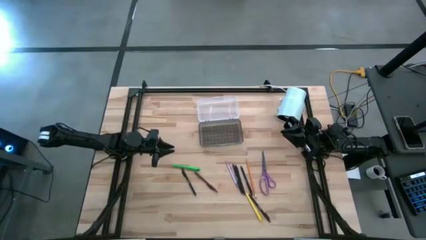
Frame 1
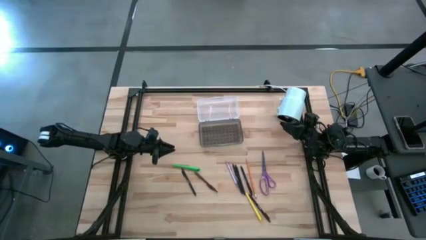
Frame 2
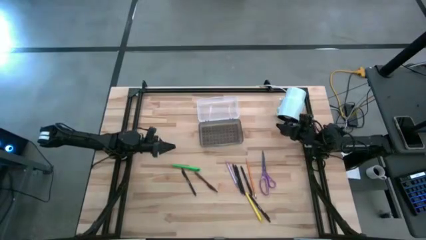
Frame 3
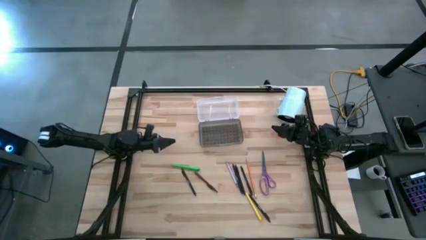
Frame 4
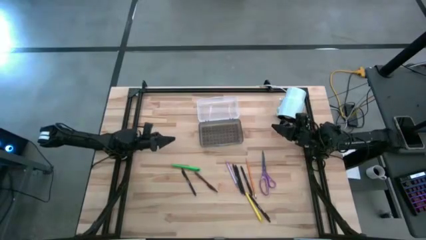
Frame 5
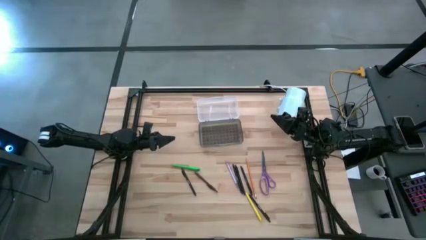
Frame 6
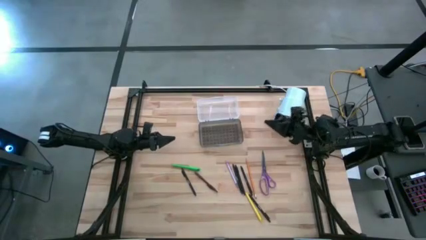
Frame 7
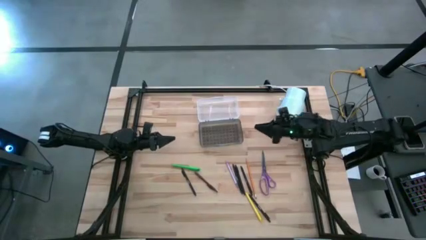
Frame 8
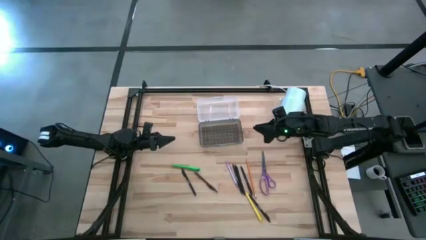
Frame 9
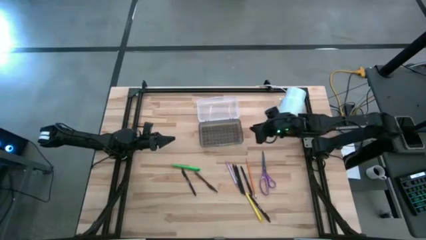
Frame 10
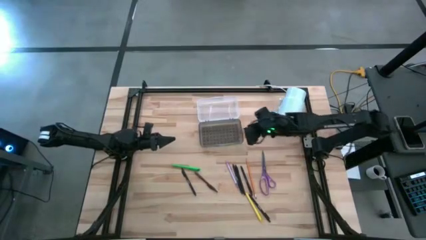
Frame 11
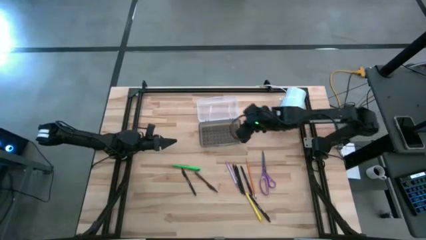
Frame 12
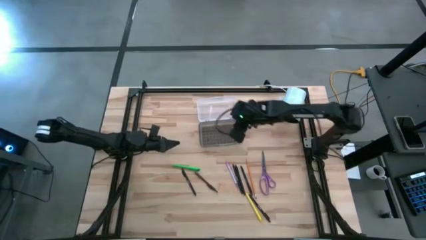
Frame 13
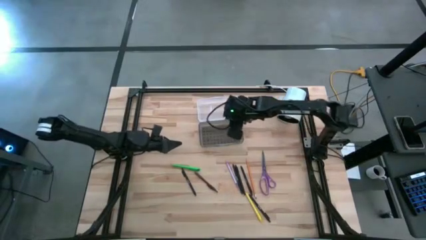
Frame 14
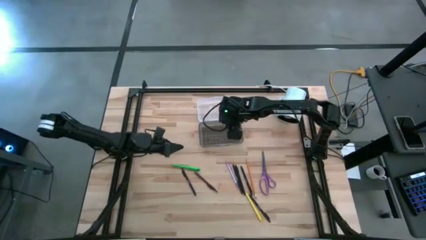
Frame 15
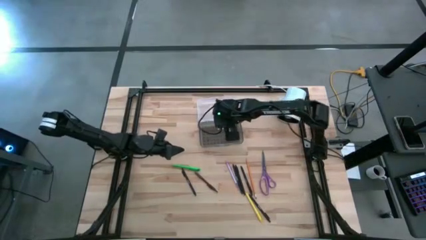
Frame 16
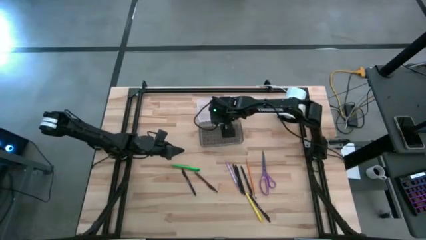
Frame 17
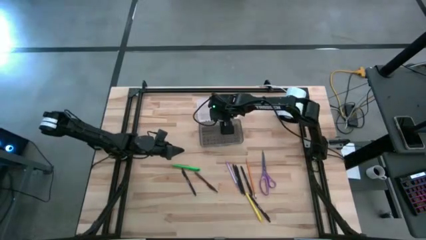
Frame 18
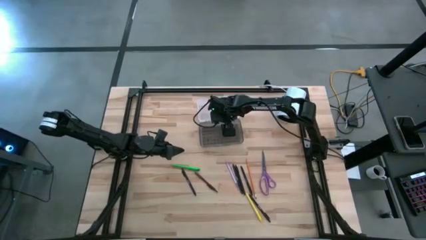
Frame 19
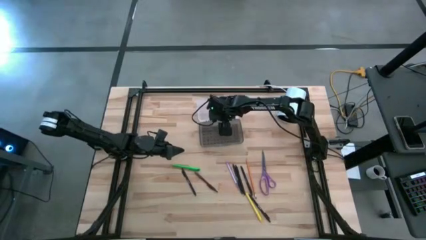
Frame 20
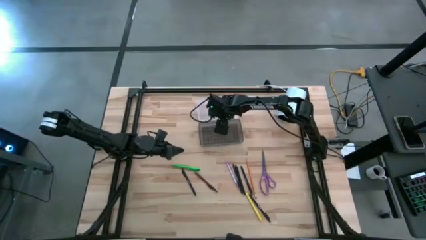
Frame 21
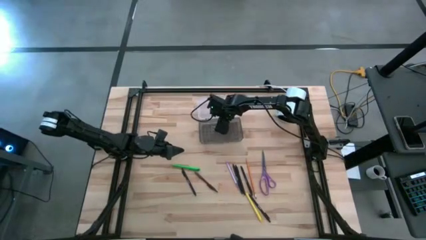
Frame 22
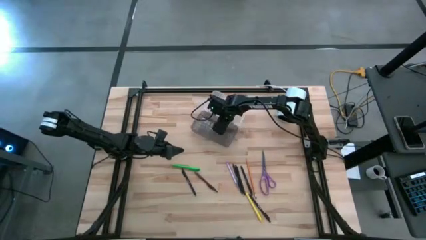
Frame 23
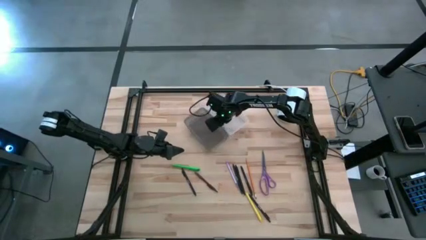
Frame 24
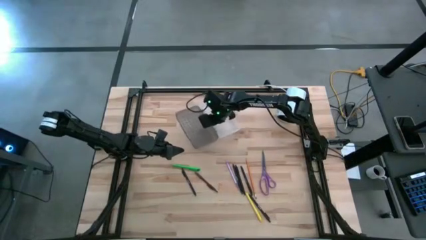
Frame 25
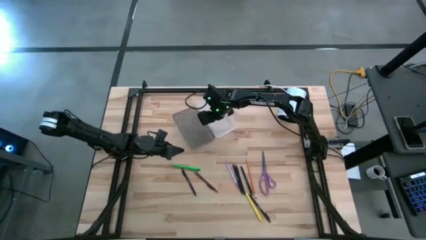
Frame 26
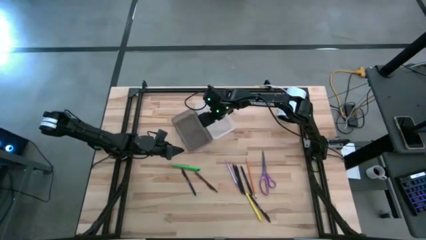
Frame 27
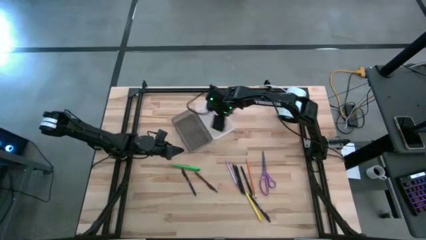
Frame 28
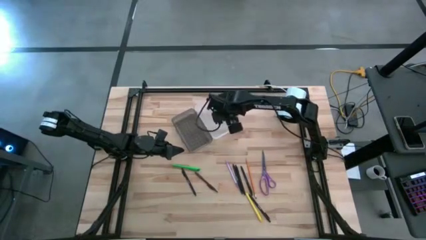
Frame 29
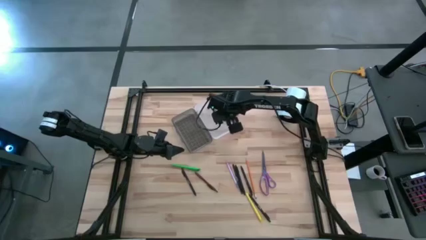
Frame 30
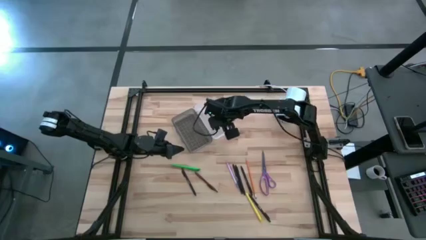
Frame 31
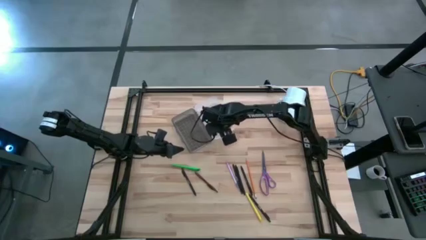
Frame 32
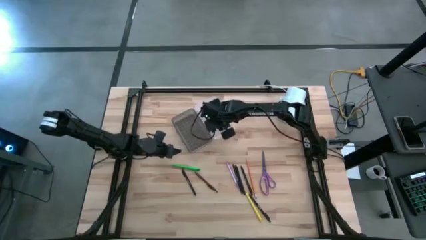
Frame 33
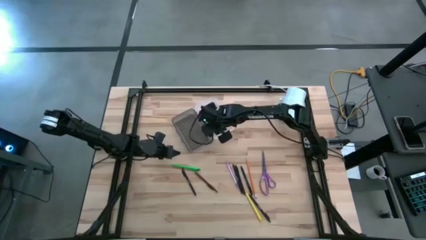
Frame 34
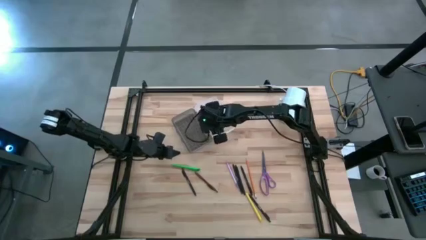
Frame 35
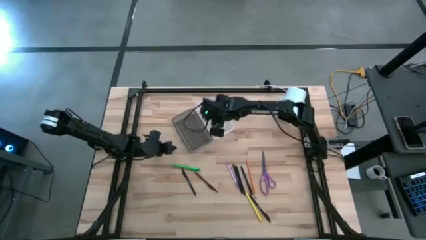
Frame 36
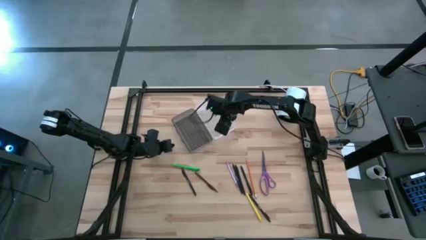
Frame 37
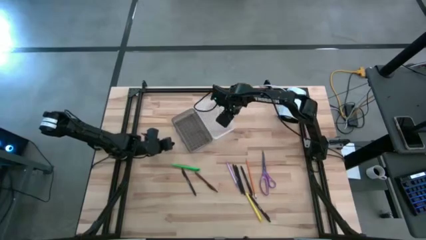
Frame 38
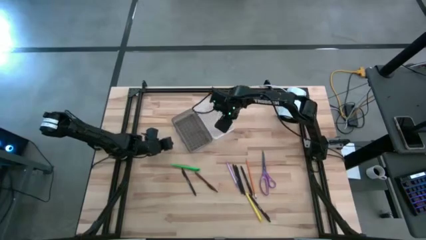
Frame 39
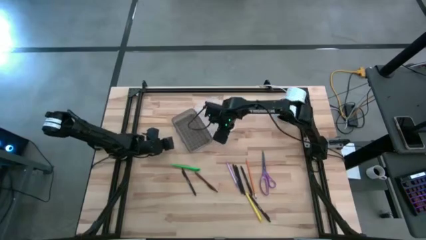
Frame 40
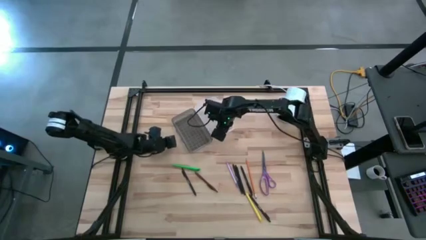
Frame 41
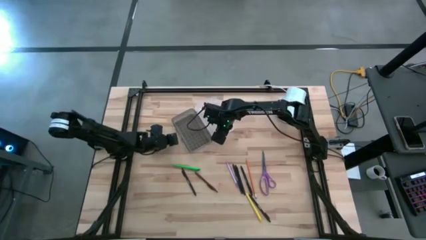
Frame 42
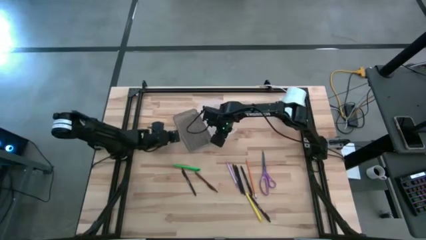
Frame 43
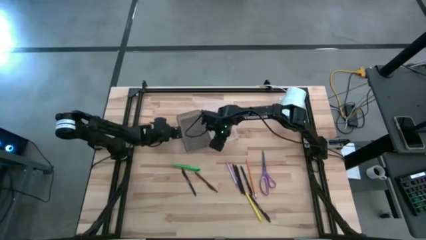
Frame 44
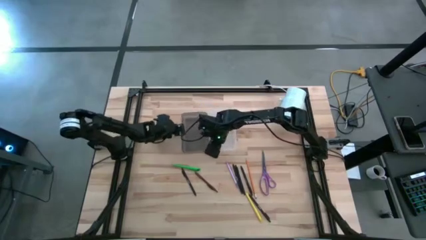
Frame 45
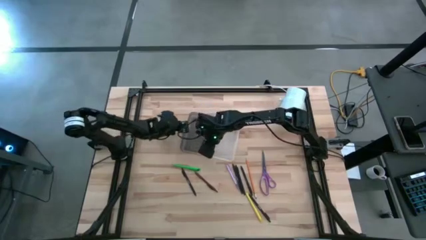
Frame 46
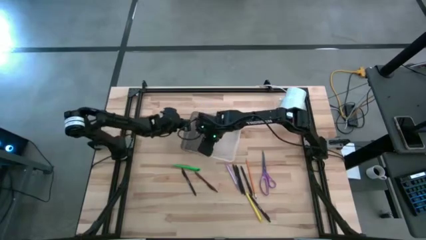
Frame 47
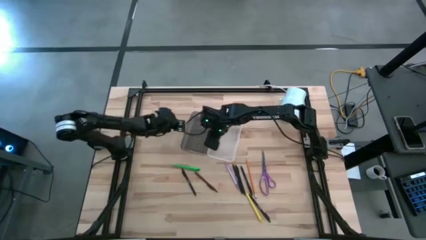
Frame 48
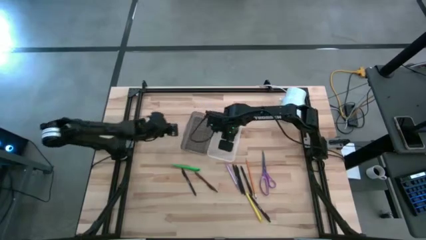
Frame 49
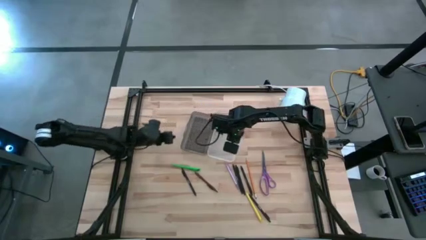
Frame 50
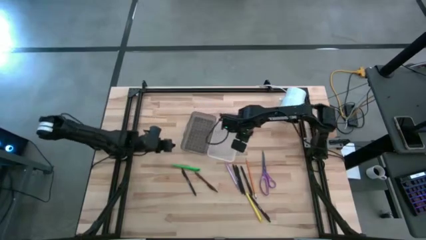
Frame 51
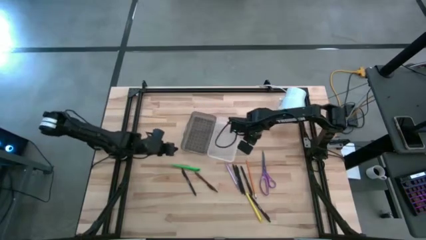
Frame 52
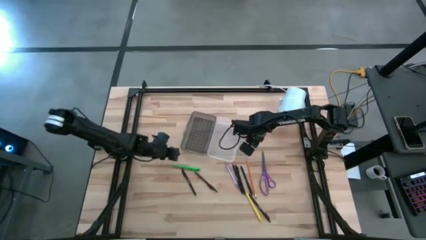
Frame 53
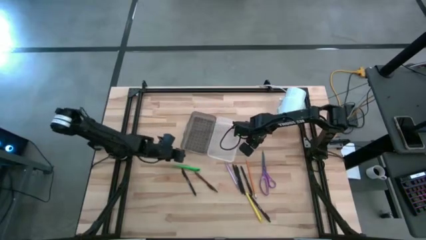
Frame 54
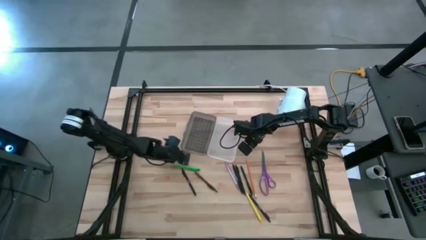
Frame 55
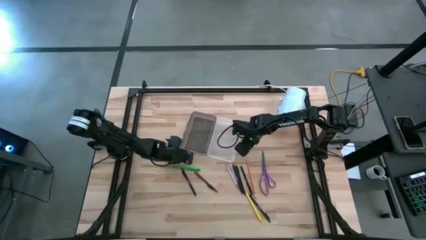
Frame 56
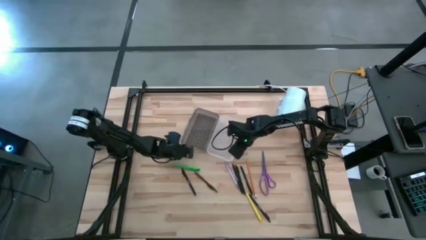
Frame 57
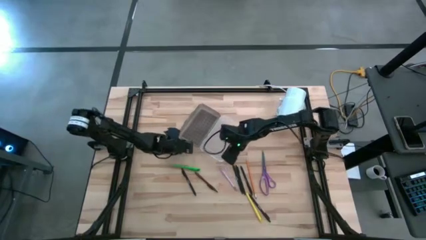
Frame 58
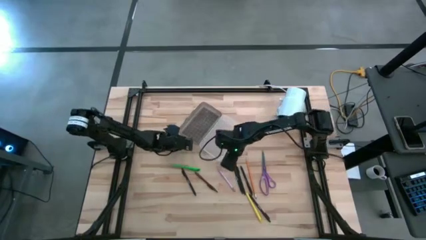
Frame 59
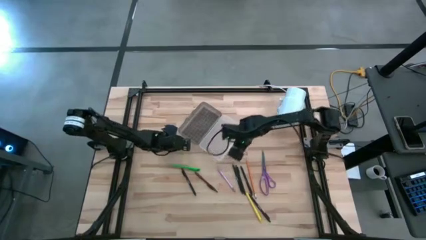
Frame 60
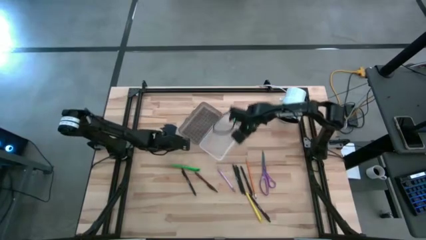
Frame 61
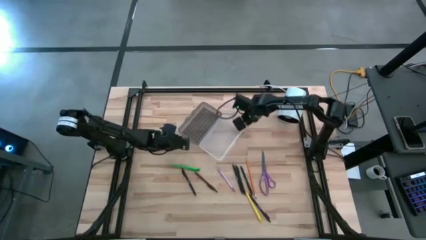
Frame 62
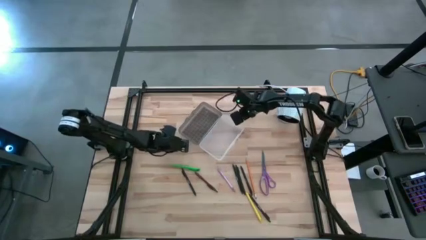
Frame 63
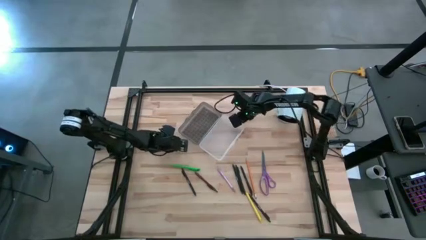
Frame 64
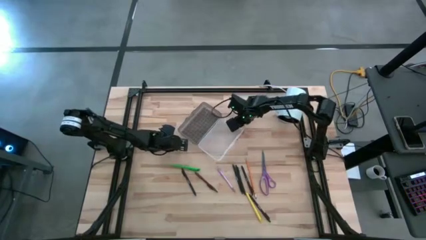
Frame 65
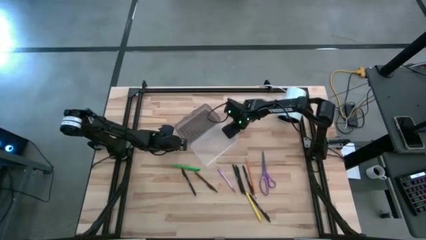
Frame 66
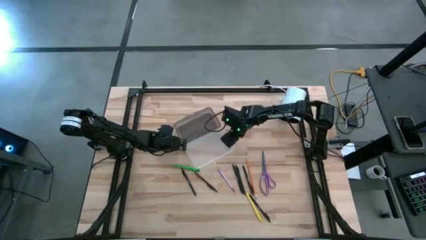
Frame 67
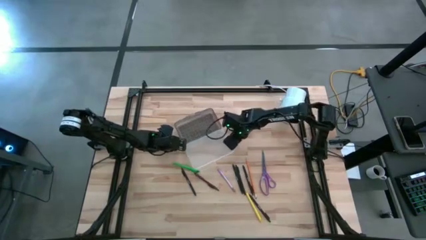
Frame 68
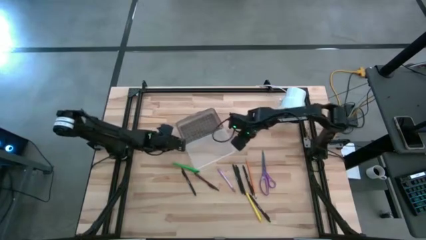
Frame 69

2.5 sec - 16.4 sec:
Task: Pick & place school supplies into a supply box
Adjust the black supply box

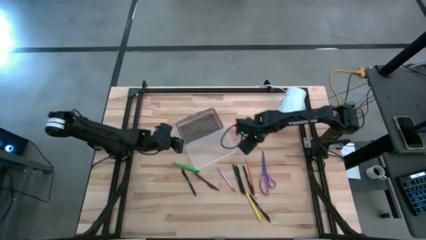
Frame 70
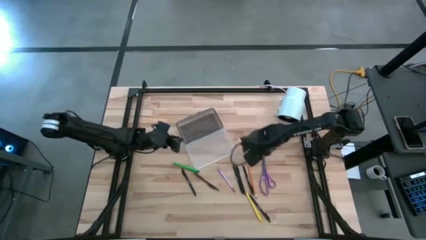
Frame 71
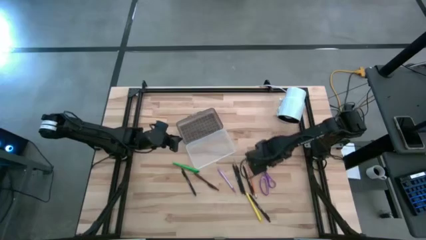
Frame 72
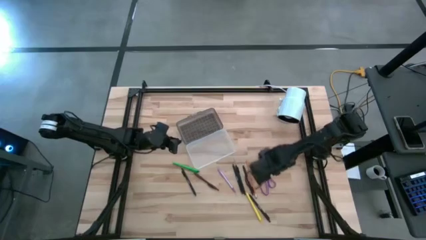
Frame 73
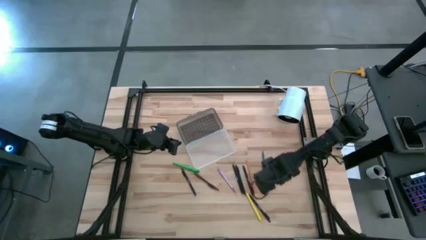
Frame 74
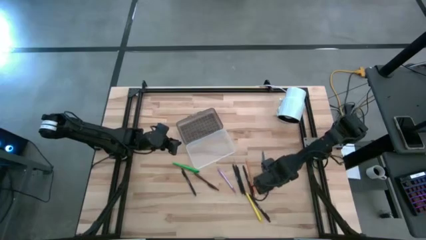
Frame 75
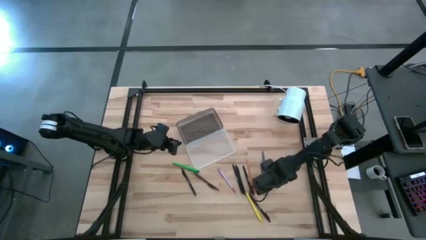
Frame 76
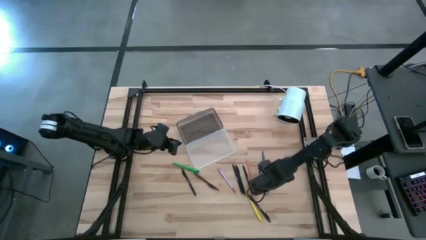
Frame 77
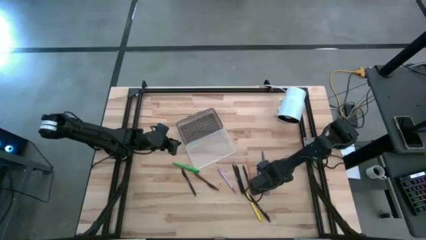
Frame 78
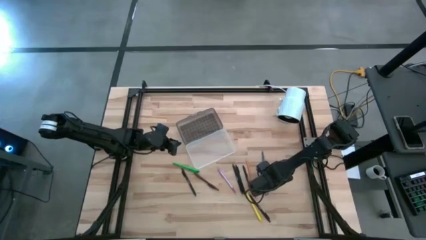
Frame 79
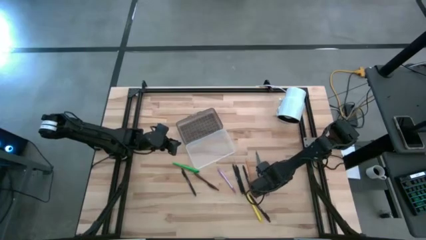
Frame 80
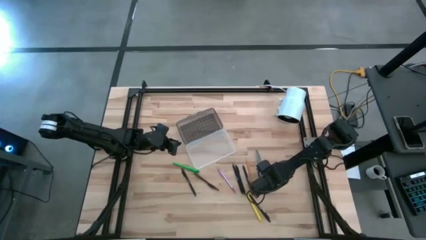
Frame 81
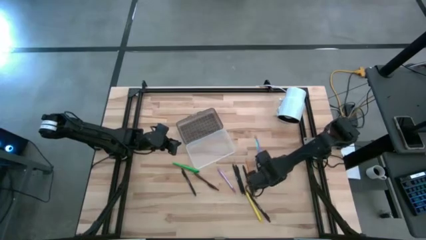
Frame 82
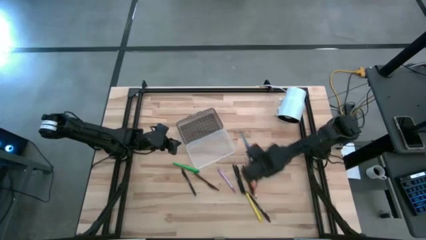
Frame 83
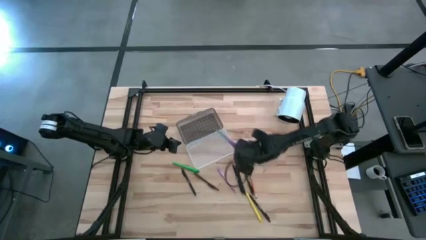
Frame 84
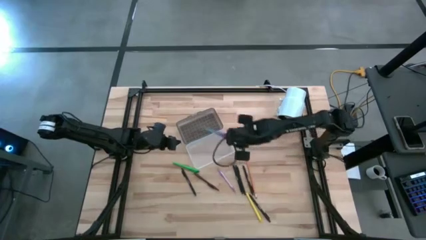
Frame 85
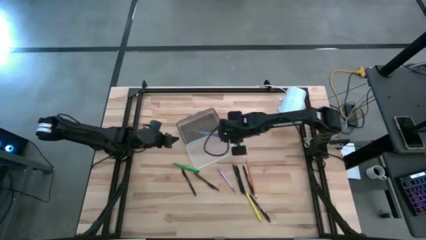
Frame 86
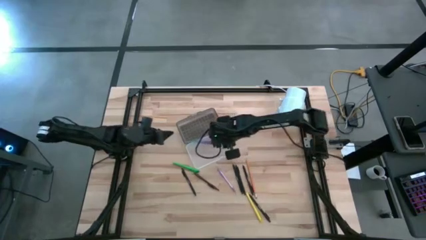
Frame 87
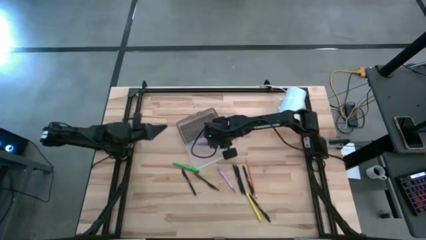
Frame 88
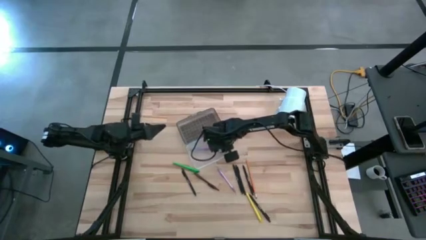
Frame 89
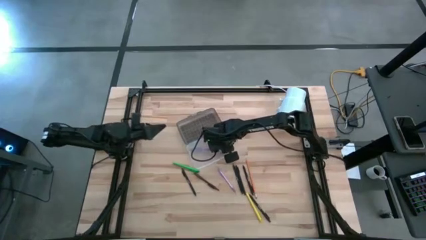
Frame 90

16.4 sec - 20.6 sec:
Put the purple scissors into the black supply box
